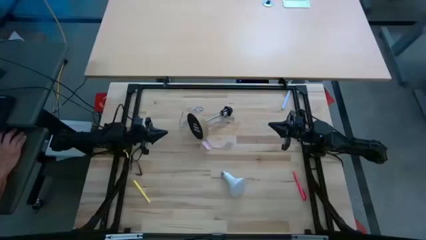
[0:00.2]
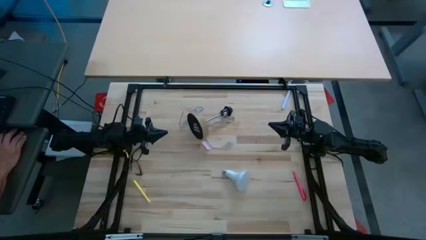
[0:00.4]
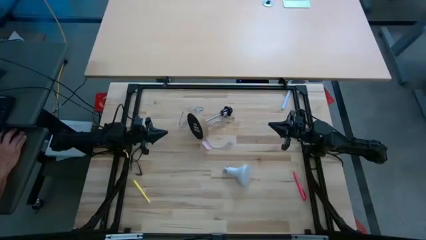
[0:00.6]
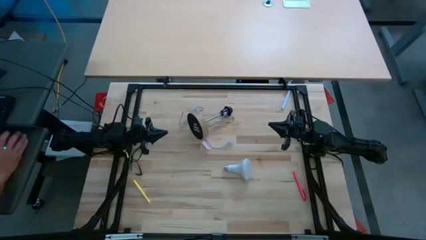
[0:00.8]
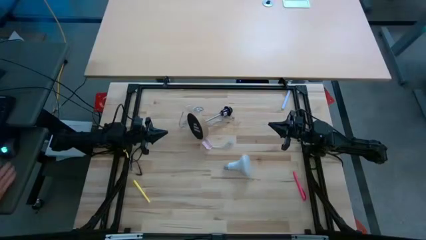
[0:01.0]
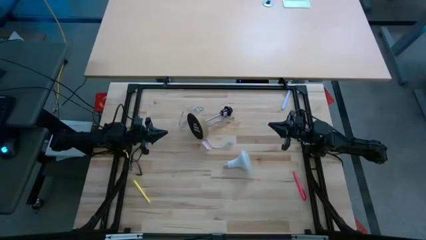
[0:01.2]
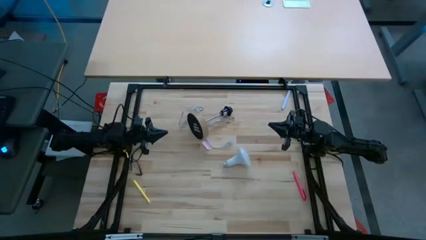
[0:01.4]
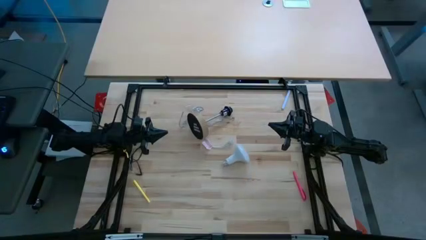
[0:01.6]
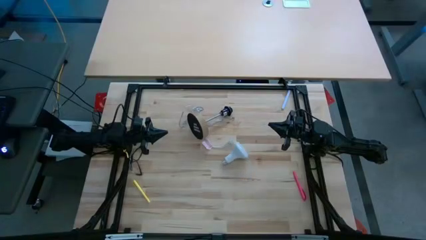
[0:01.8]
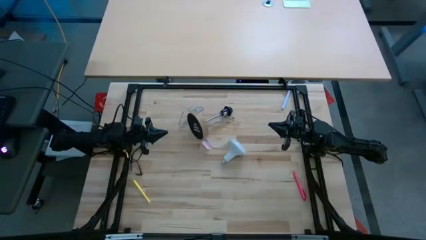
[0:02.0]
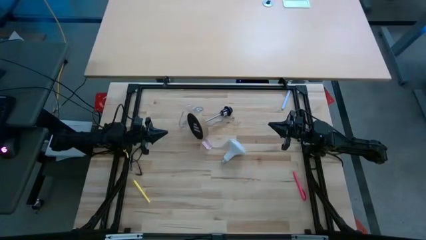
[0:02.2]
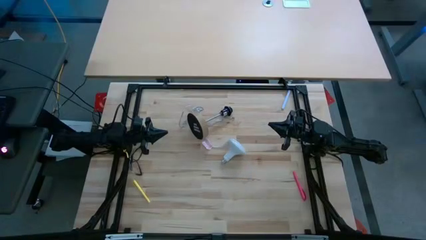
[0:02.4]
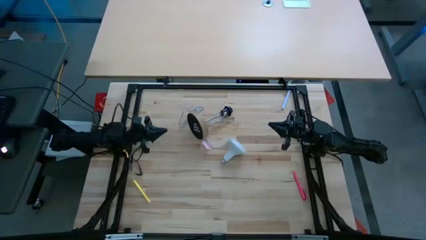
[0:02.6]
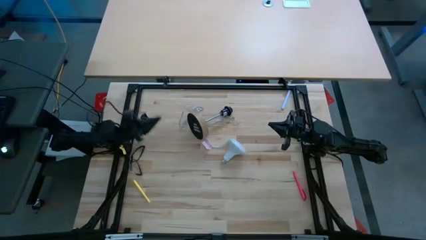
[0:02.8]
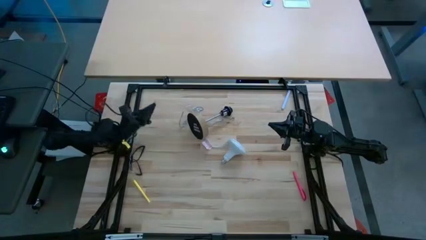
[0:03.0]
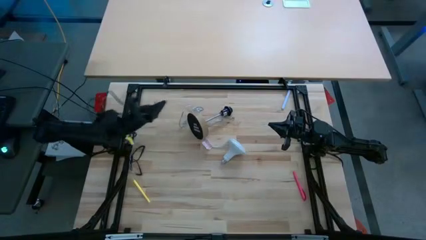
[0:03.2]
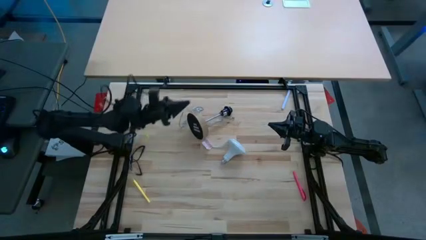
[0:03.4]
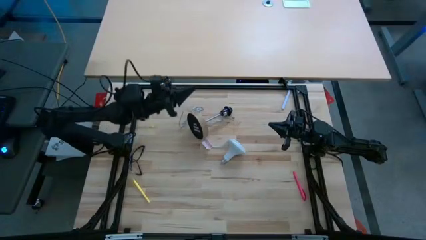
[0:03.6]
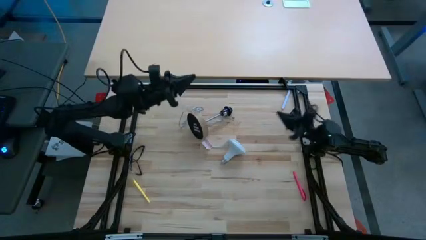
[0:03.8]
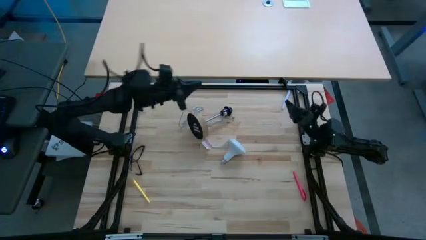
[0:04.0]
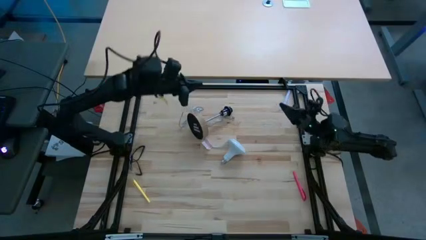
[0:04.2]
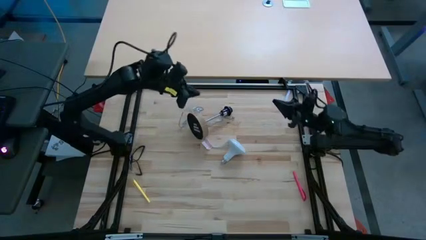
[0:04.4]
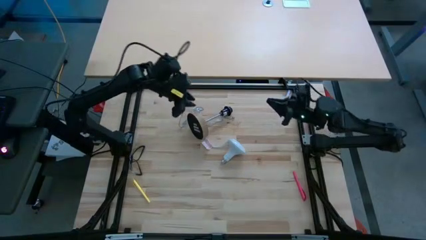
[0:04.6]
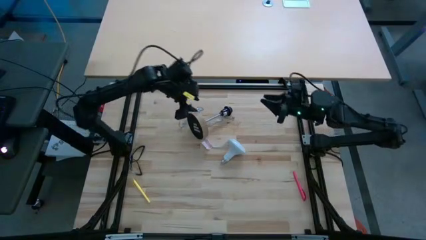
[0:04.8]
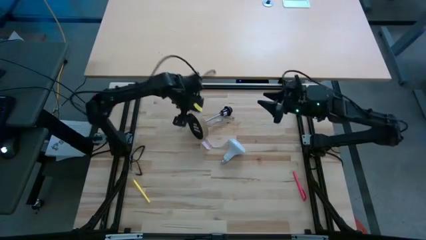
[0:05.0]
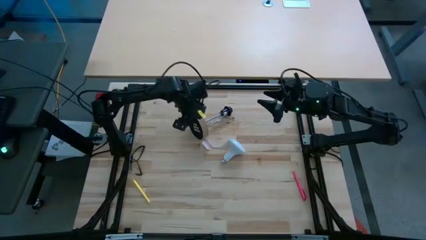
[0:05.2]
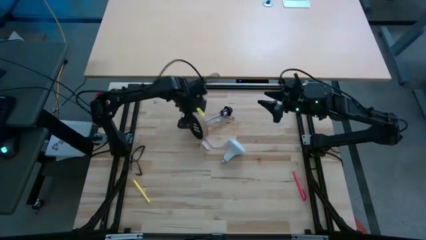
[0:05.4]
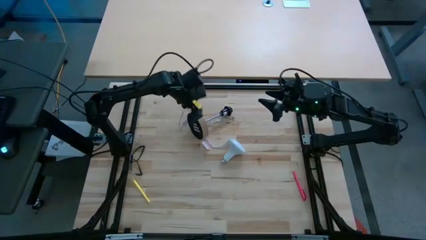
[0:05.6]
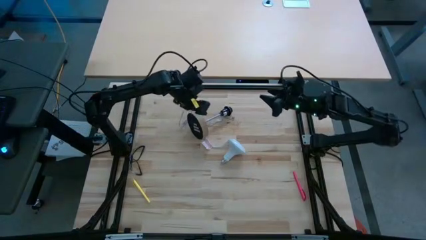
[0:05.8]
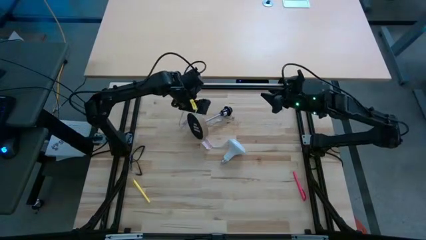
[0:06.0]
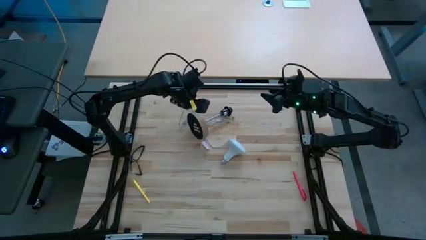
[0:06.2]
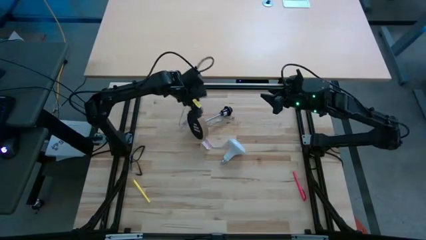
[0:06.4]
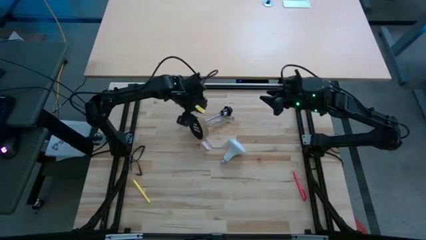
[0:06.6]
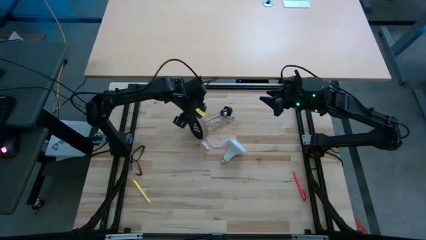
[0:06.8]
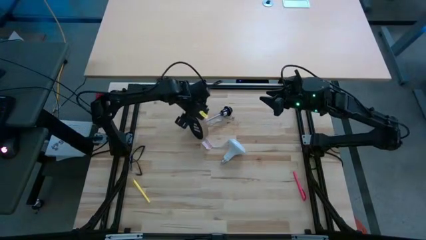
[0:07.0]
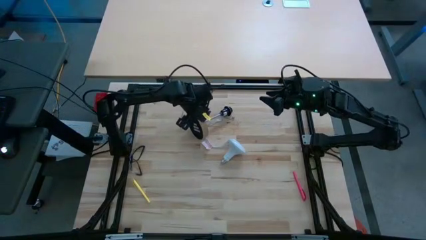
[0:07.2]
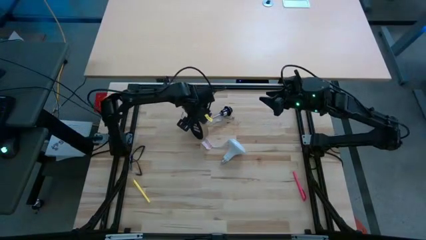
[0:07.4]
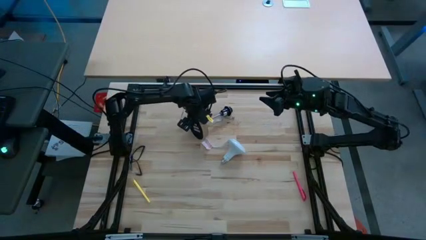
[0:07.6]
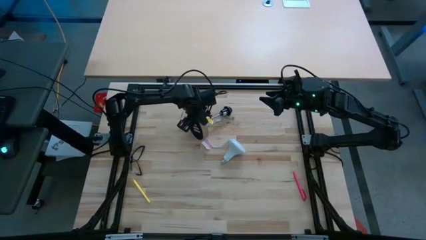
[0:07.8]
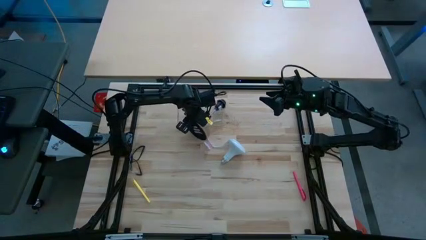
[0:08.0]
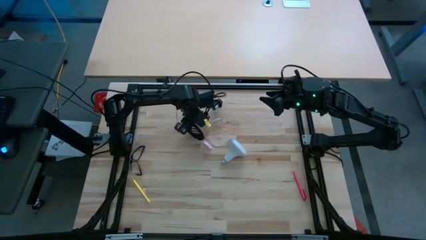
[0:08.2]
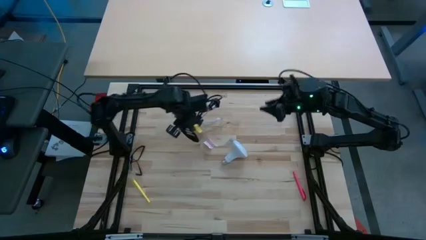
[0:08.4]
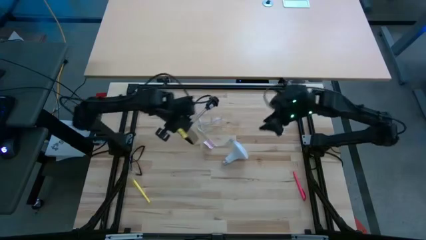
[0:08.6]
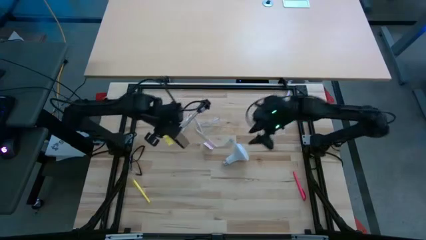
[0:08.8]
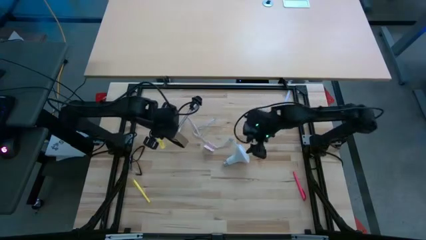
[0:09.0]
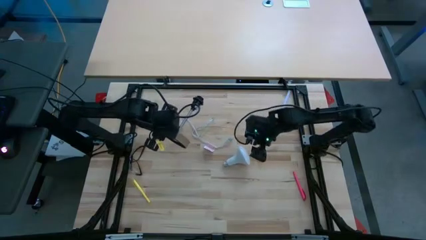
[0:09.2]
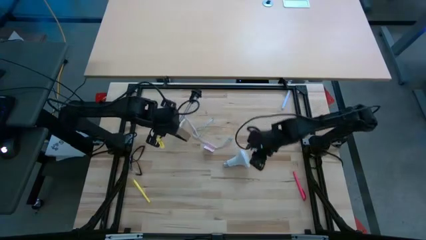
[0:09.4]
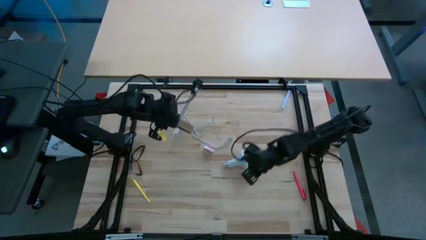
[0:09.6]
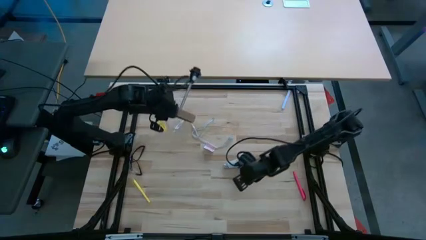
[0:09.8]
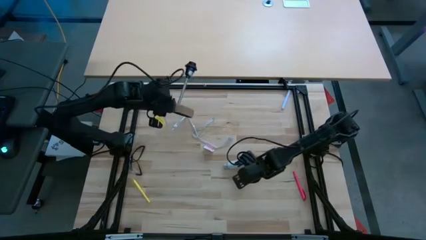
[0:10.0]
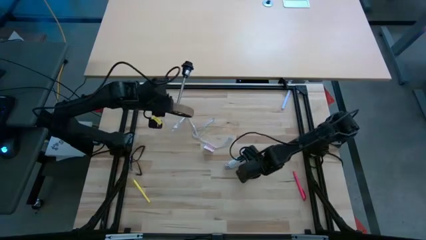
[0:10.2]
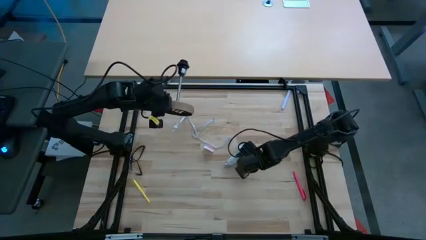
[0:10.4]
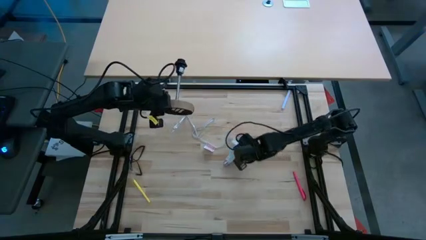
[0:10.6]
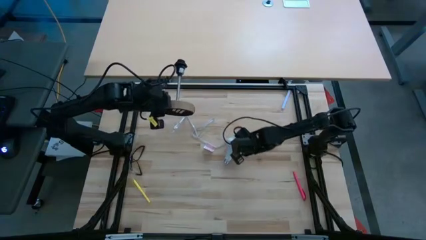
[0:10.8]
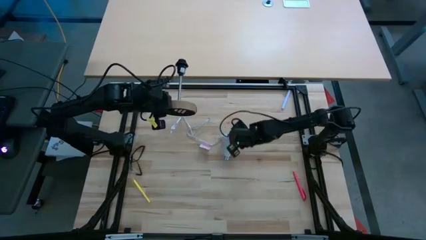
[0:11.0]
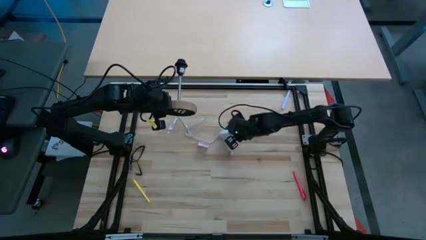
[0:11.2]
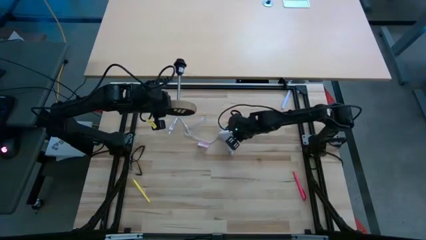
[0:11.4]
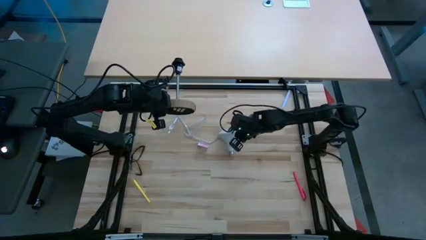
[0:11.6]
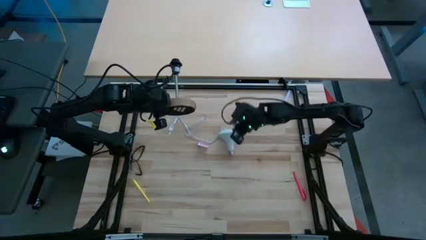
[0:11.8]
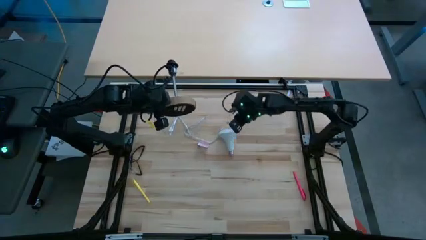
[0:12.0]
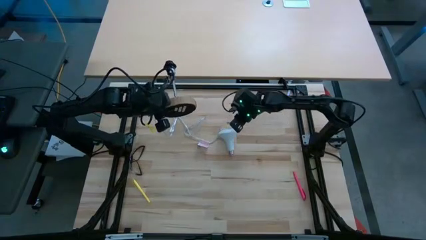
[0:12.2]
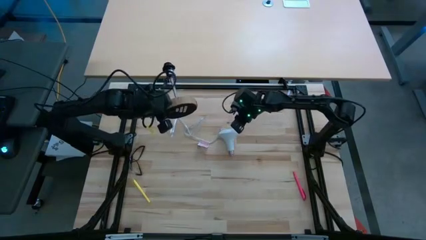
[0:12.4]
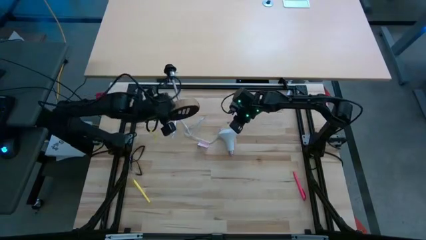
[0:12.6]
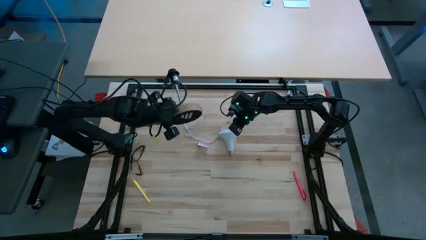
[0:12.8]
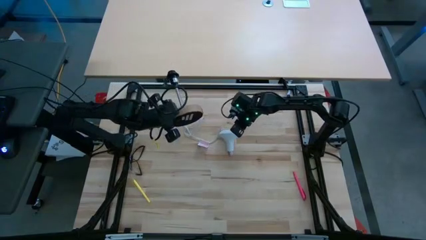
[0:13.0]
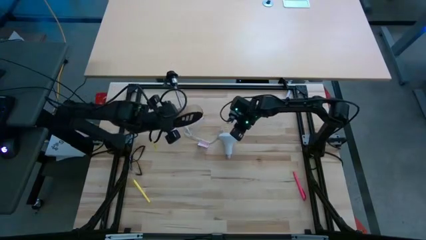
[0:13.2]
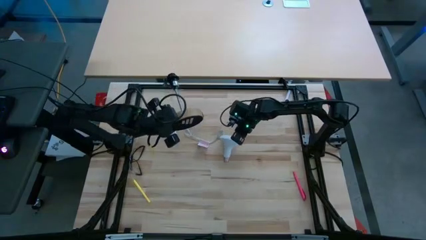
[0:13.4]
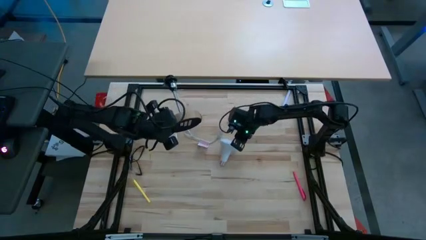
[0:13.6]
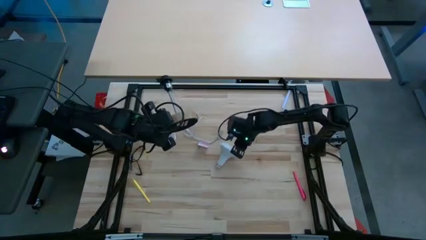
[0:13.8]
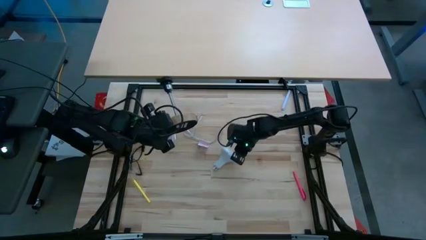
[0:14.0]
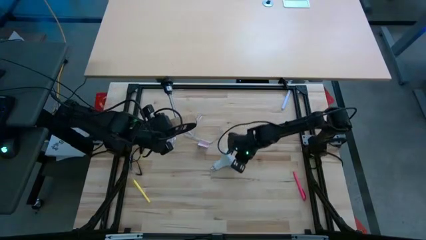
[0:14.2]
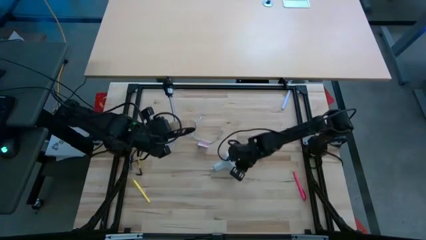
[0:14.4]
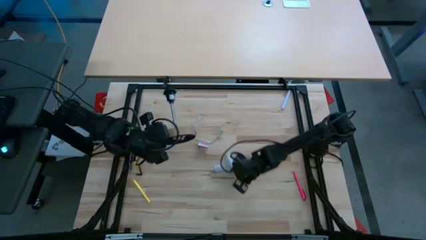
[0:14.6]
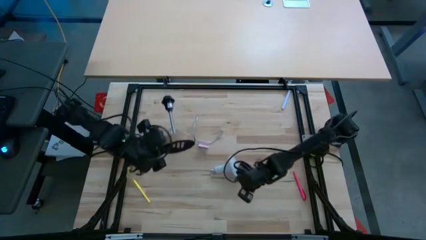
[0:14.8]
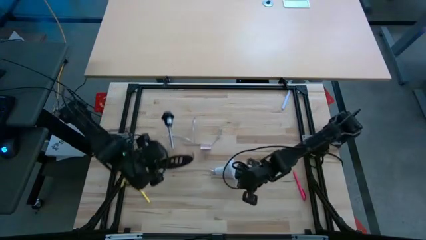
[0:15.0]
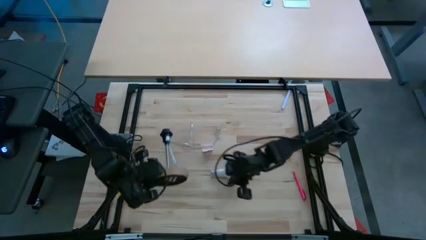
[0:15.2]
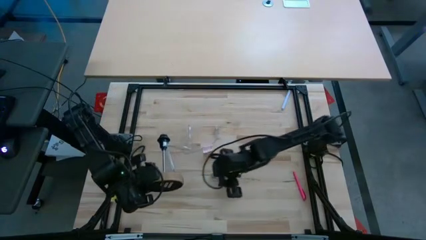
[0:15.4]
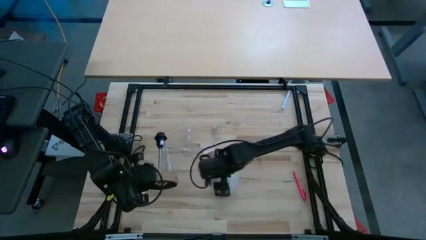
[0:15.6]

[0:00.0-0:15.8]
Task: Screw lightbulb
Insert the light bulb into the lamp holder
